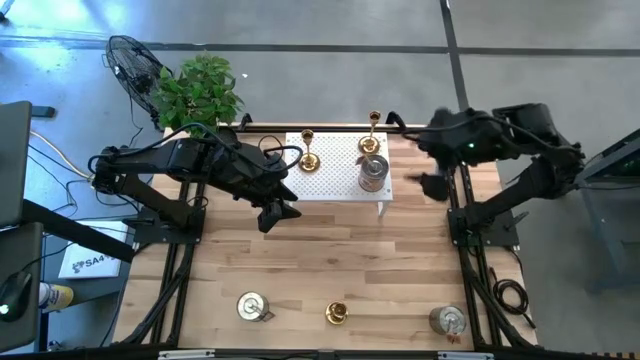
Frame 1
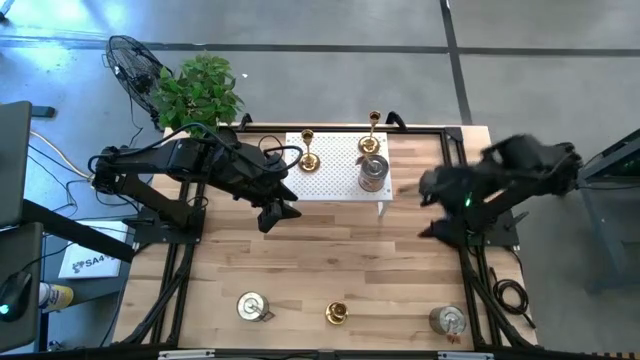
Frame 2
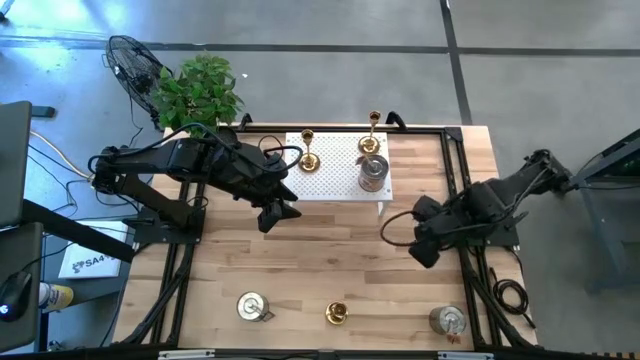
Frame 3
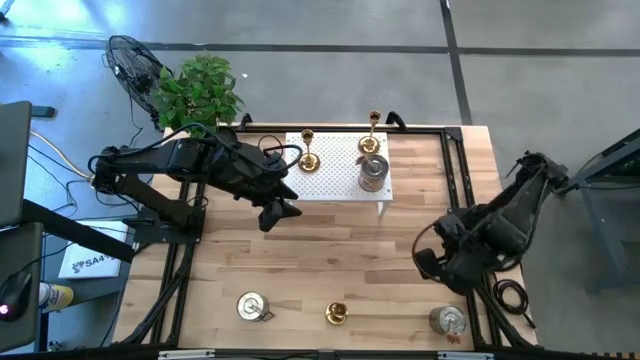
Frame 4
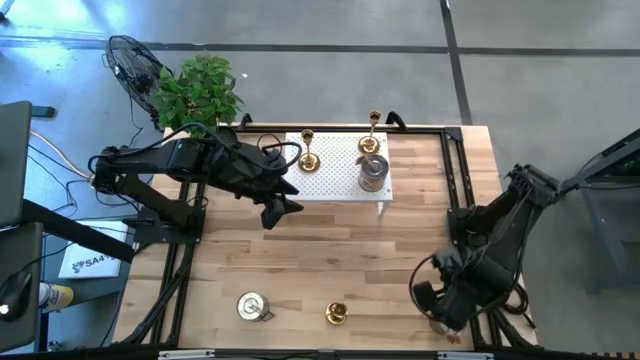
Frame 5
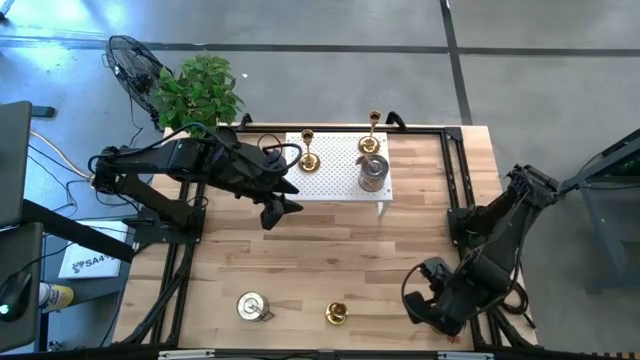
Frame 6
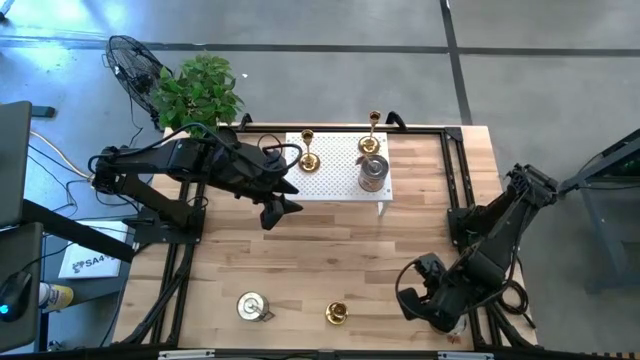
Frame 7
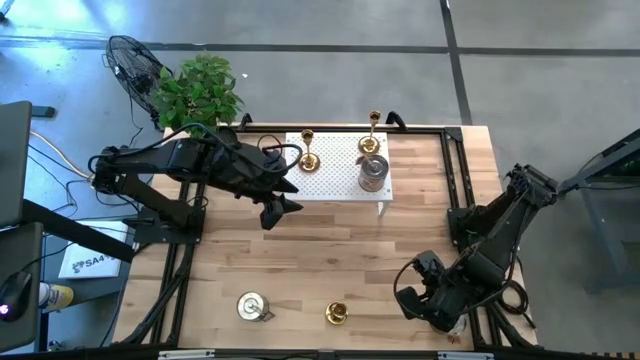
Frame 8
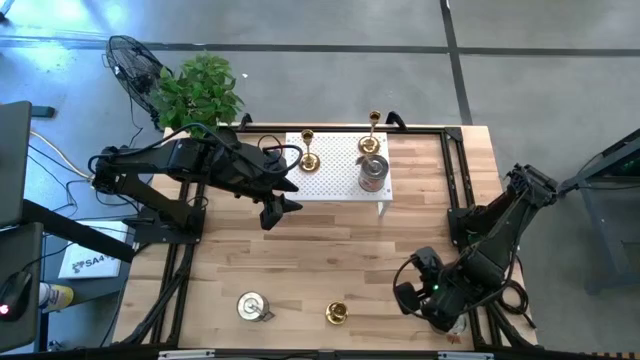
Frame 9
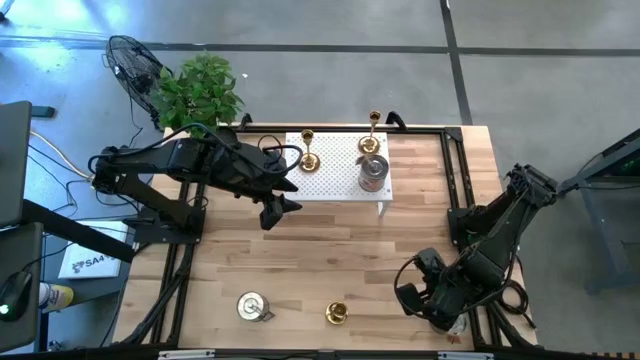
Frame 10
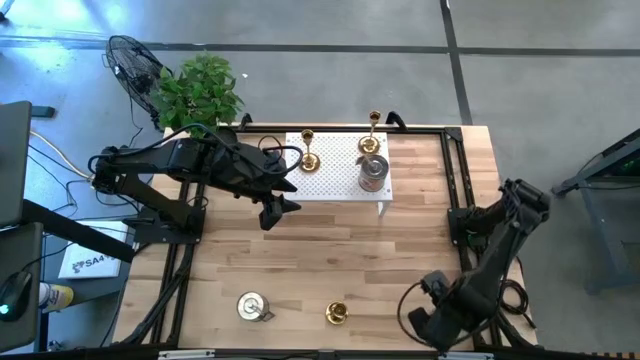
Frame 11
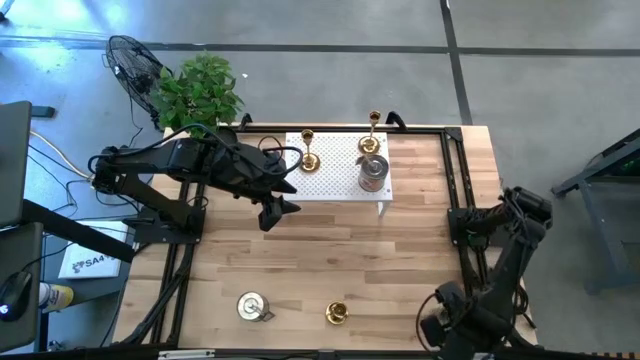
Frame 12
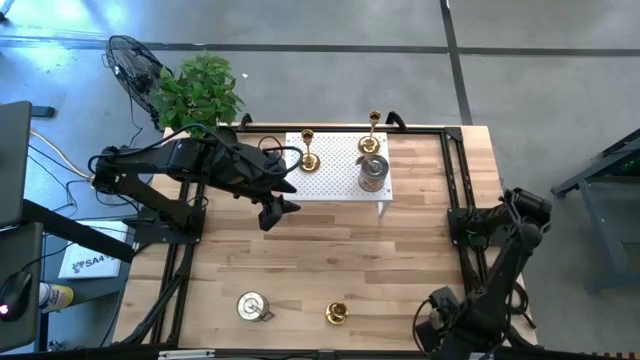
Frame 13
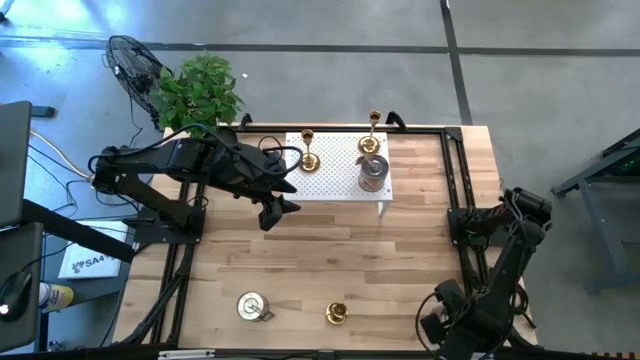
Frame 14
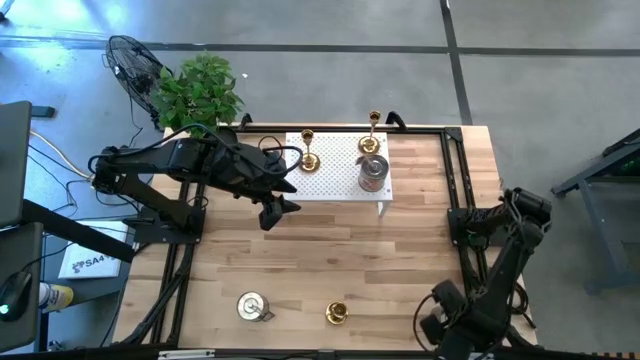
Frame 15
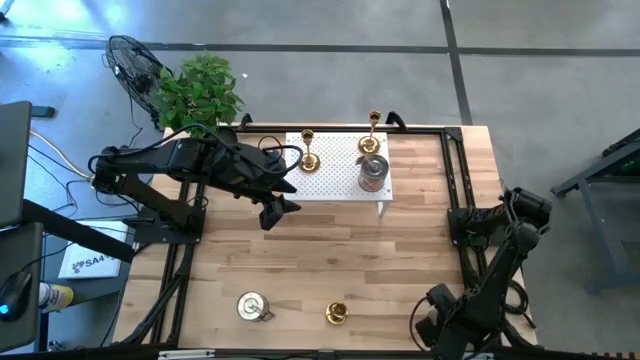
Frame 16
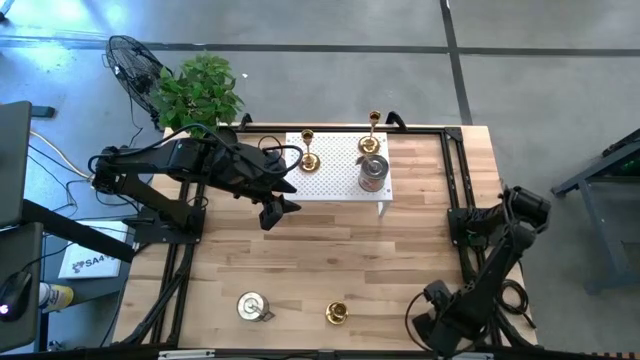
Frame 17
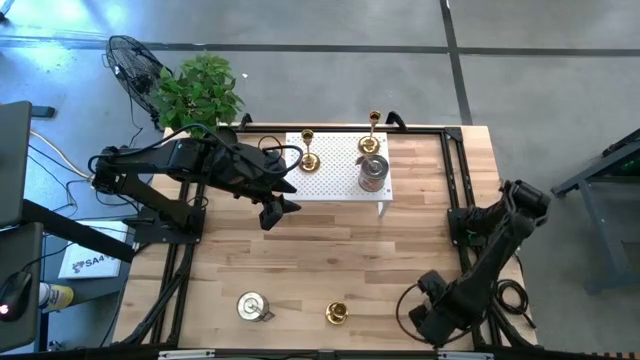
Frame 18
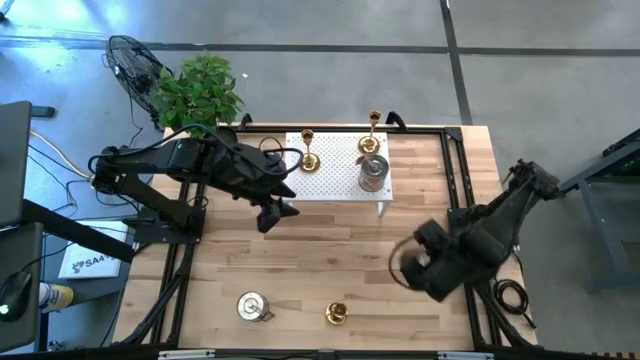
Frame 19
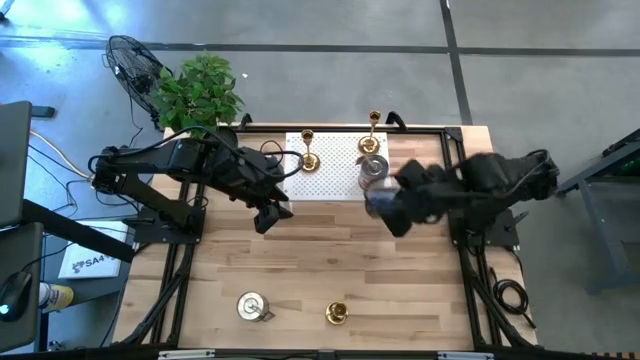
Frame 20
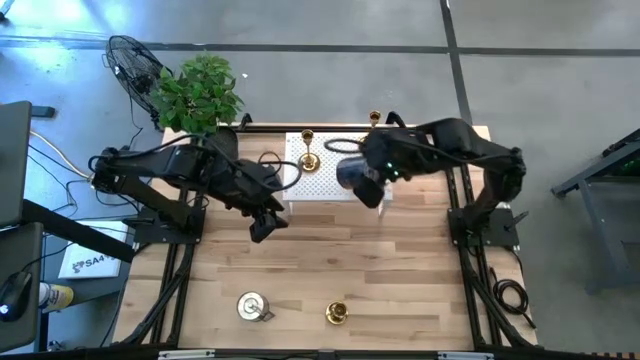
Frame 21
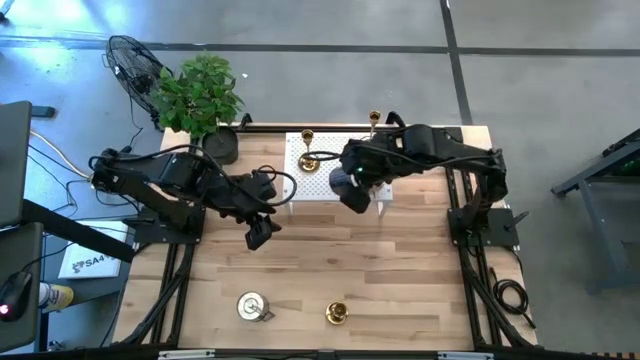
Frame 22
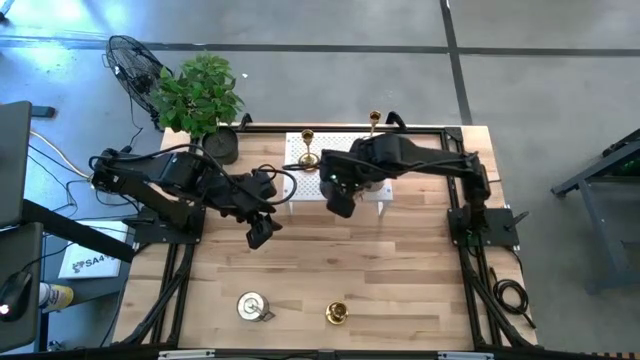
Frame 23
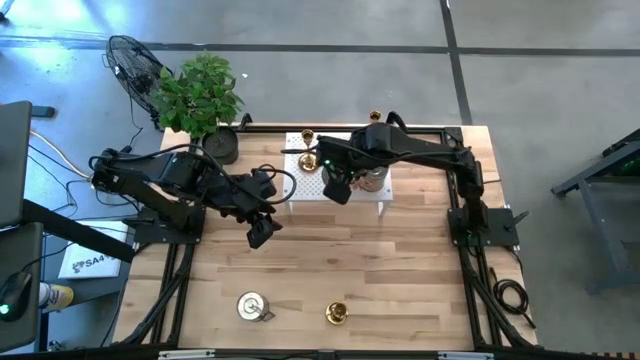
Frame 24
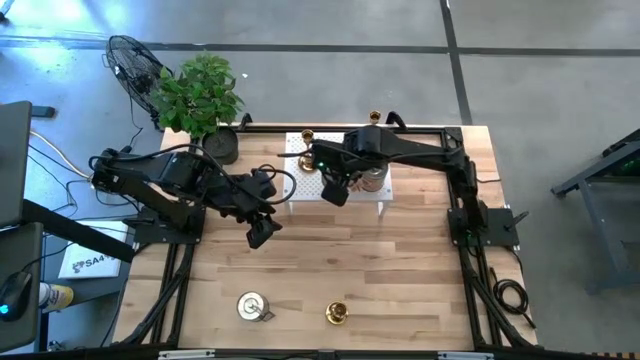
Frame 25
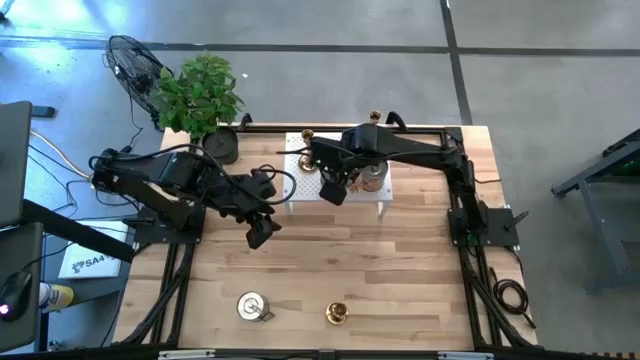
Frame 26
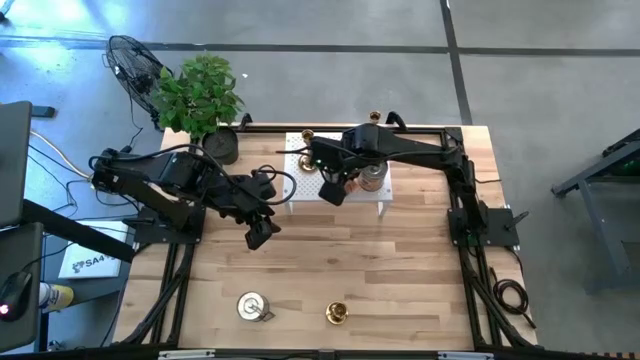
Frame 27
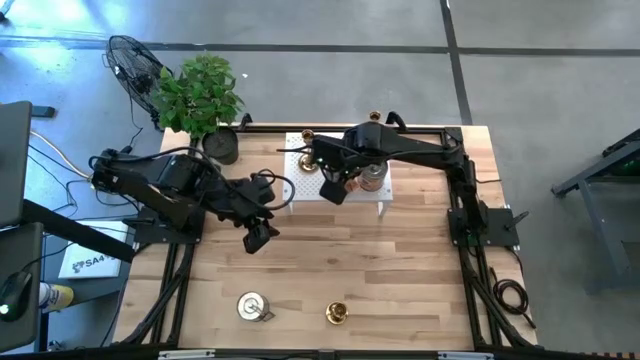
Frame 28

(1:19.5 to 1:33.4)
Task: Pick & Place candle stick holders
Align the right silver scented candle with the other silver scented candle on the shelf

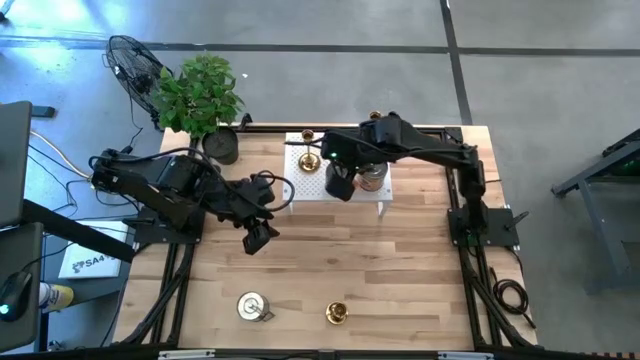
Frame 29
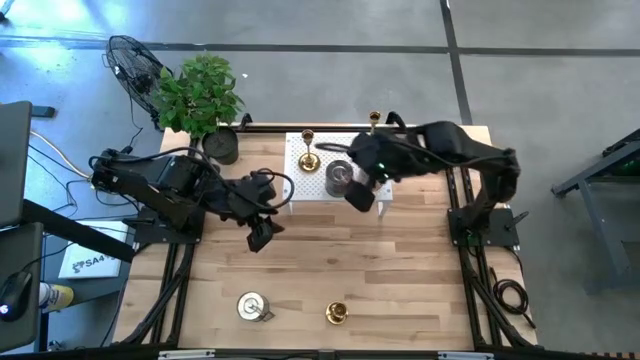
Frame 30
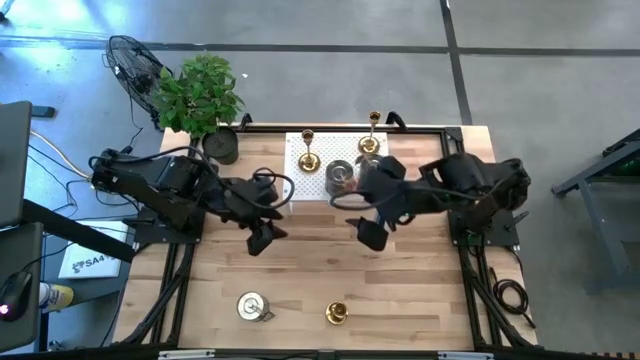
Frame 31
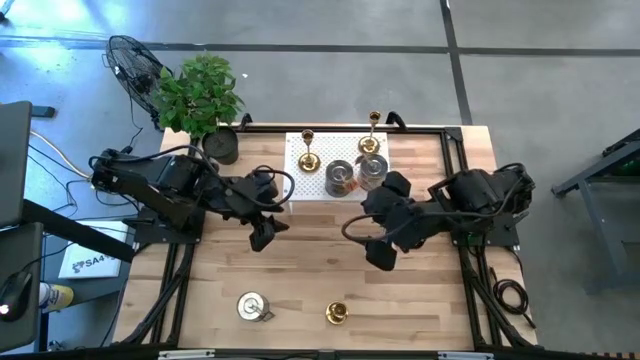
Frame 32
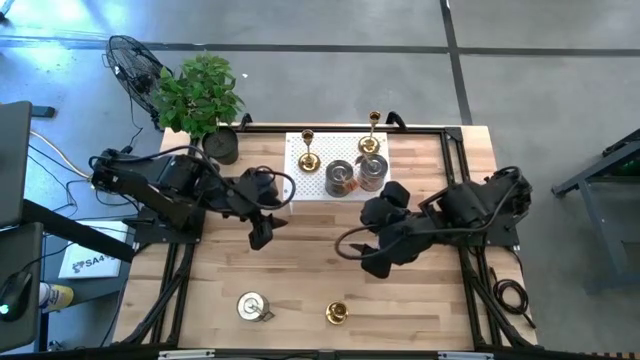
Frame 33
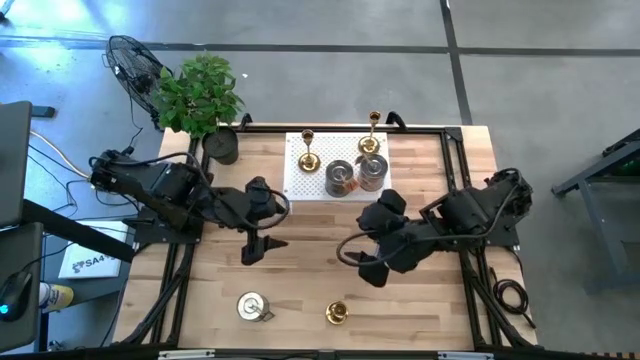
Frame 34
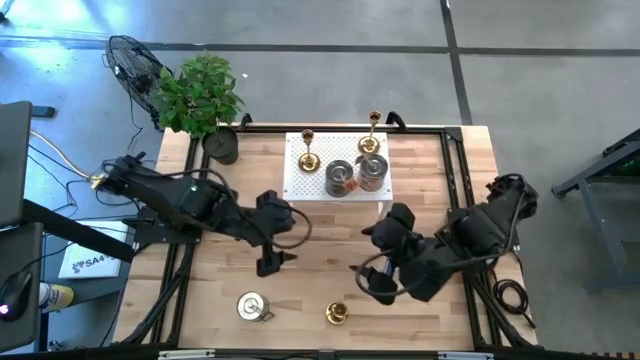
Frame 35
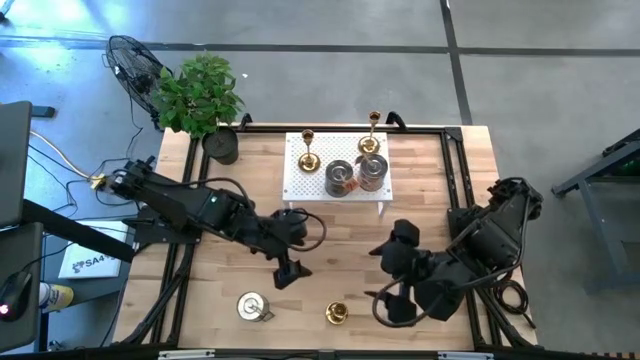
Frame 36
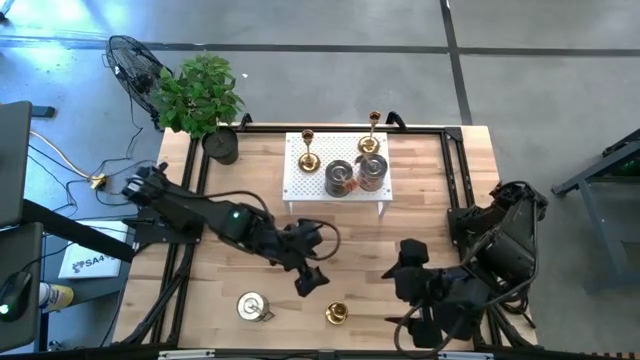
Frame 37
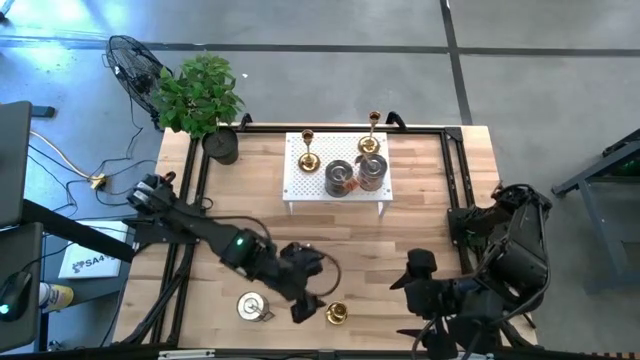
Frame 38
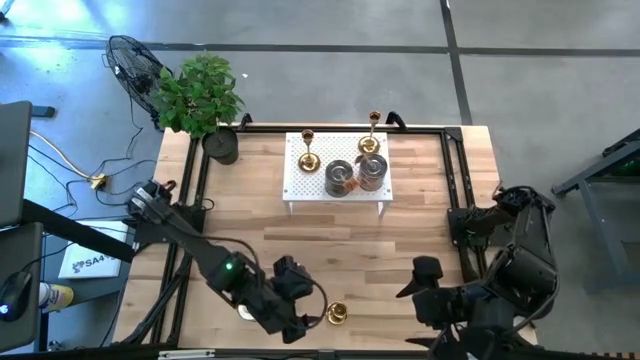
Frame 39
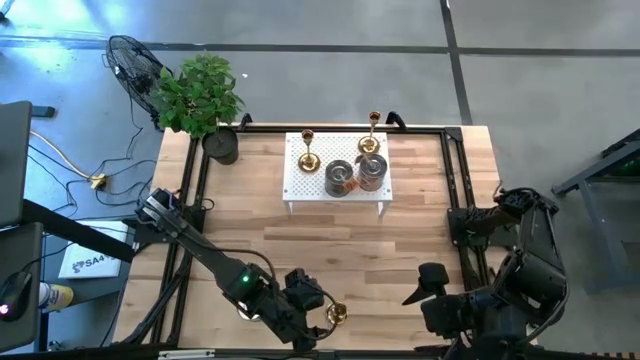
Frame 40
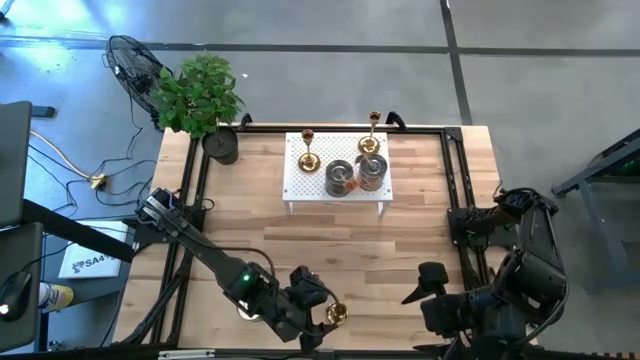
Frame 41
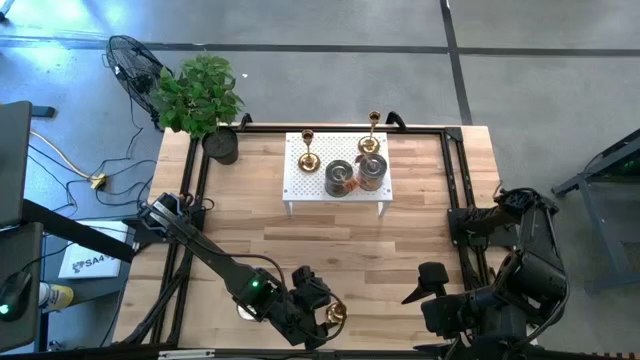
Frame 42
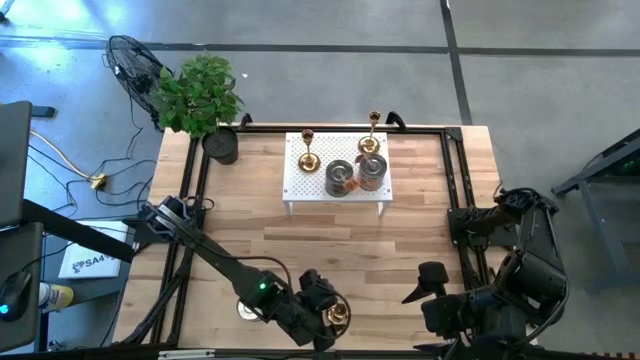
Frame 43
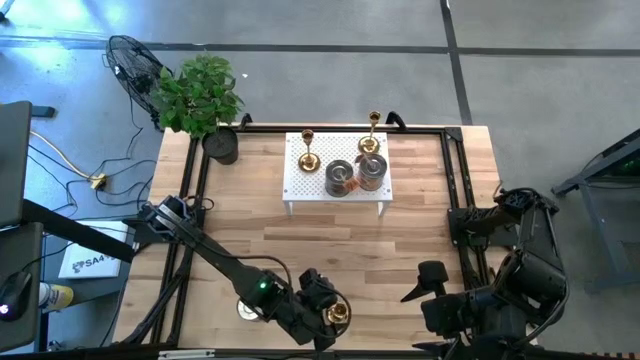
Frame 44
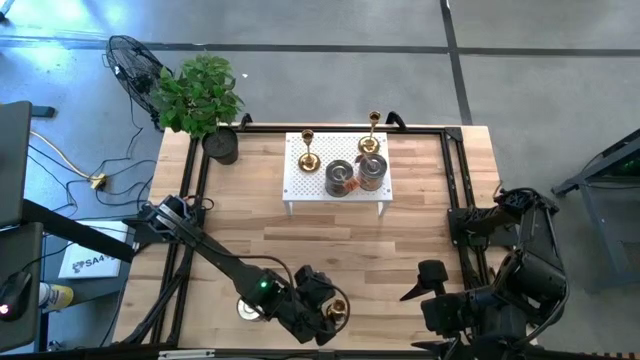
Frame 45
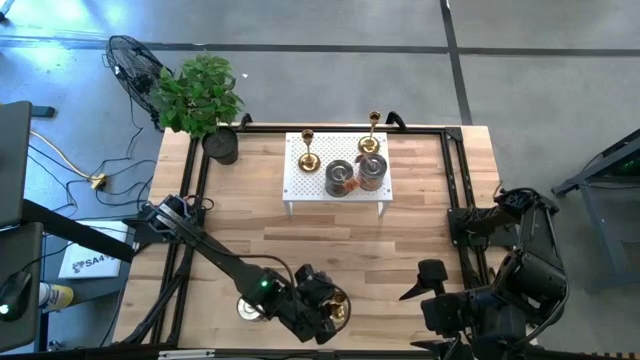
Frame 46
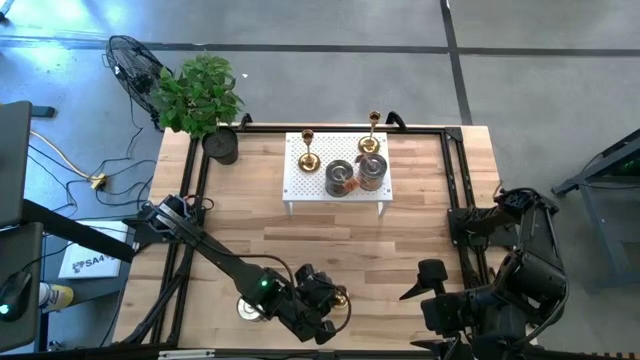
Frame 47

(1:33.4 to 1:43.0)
Align the gold candle holder with the other gold candle holder on the shelf
